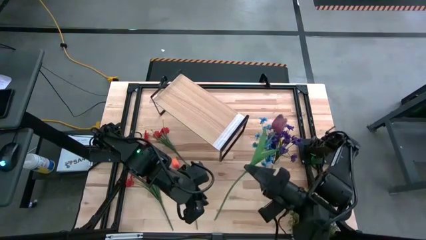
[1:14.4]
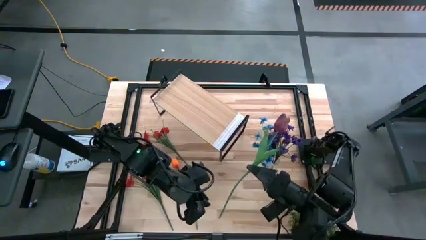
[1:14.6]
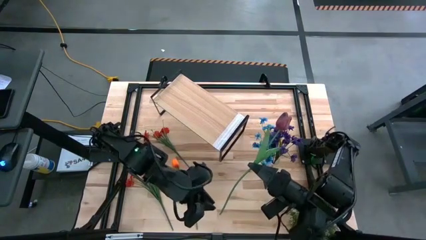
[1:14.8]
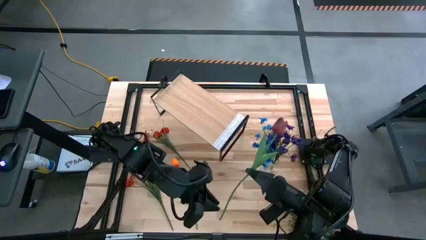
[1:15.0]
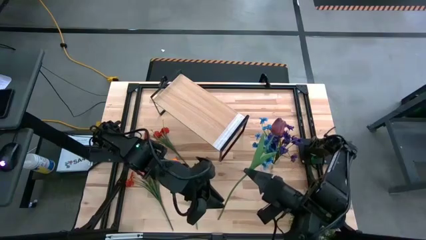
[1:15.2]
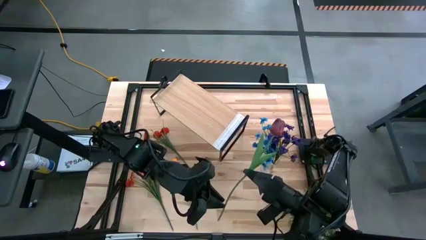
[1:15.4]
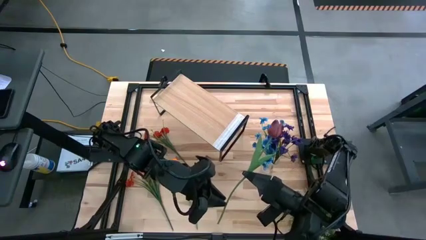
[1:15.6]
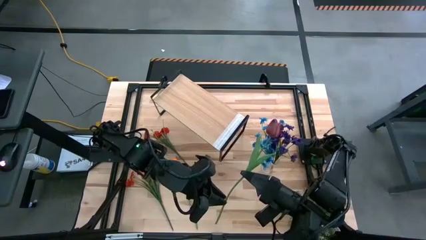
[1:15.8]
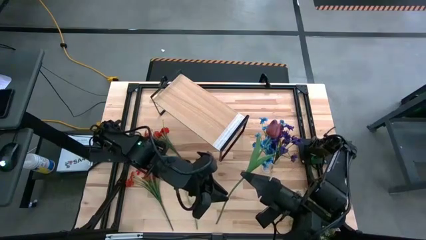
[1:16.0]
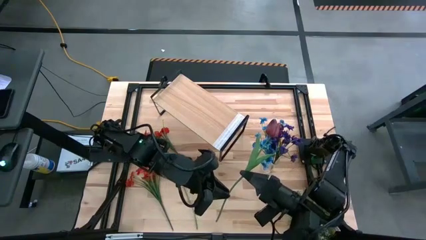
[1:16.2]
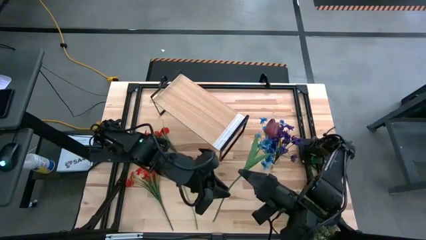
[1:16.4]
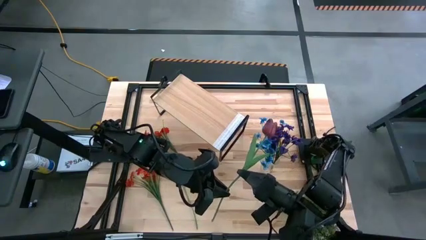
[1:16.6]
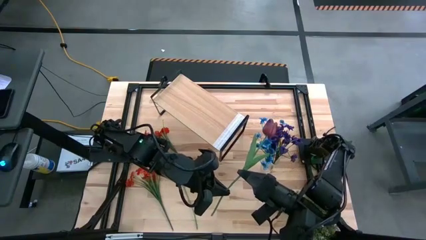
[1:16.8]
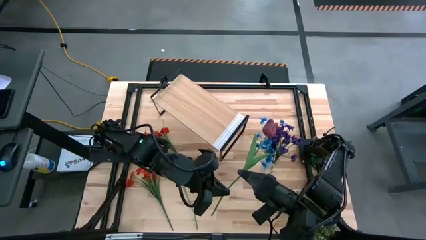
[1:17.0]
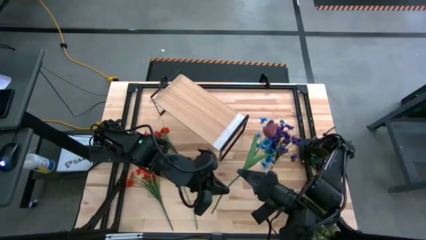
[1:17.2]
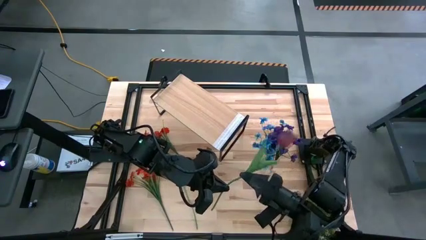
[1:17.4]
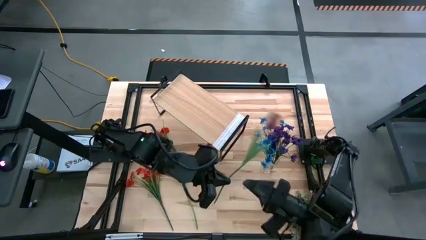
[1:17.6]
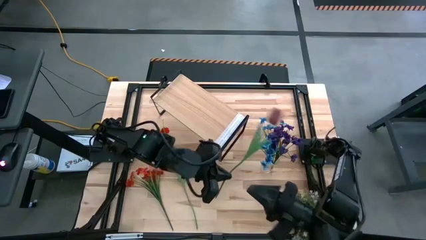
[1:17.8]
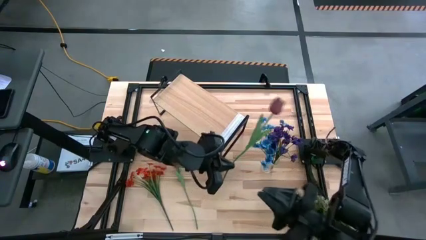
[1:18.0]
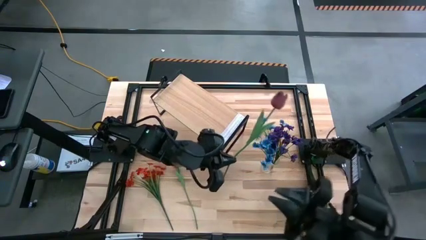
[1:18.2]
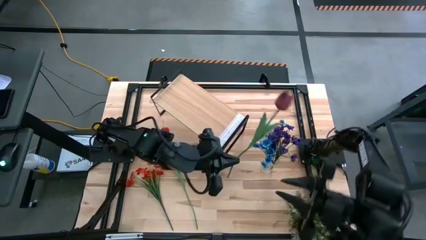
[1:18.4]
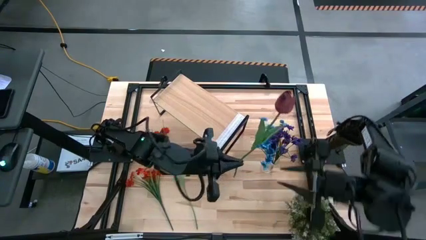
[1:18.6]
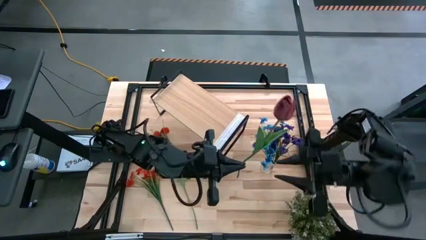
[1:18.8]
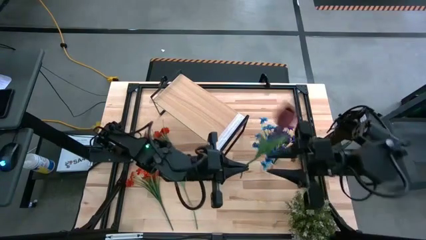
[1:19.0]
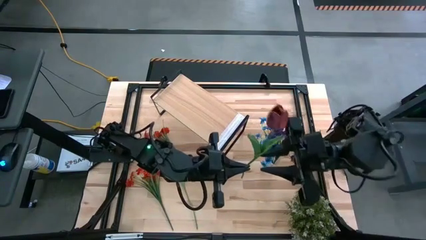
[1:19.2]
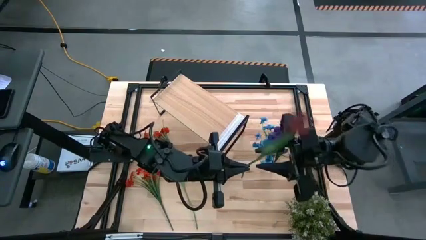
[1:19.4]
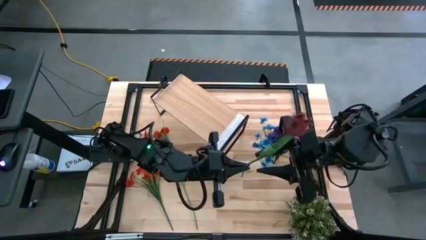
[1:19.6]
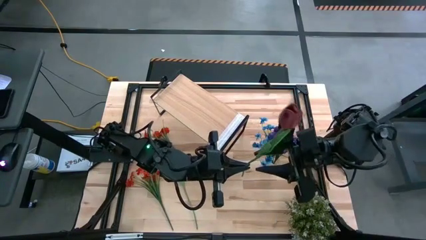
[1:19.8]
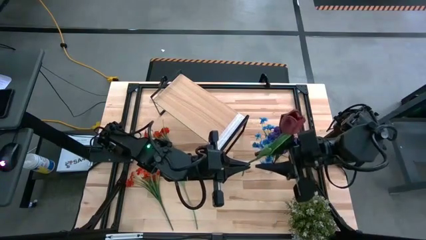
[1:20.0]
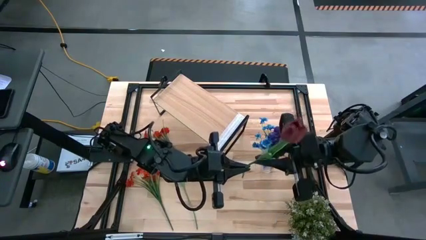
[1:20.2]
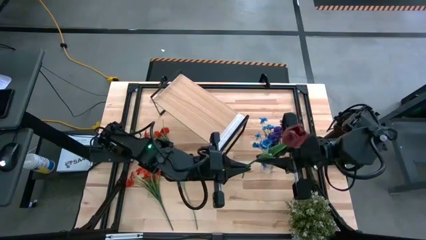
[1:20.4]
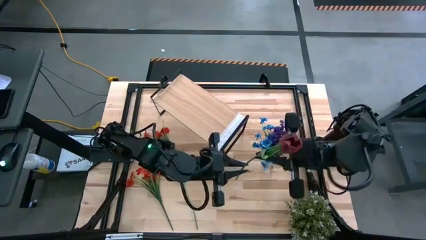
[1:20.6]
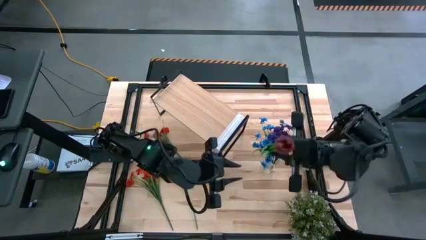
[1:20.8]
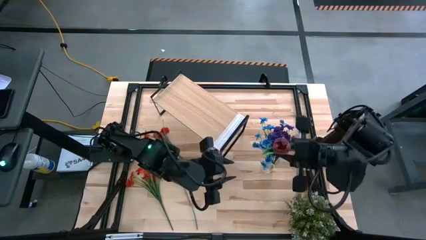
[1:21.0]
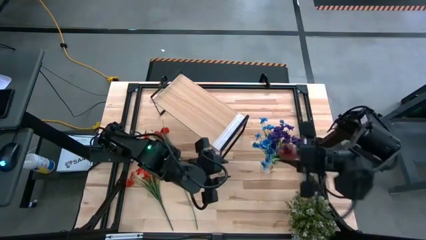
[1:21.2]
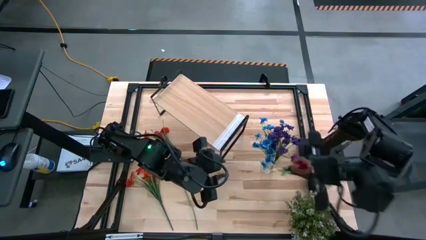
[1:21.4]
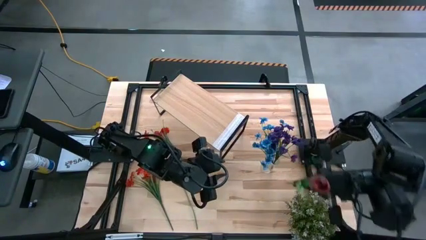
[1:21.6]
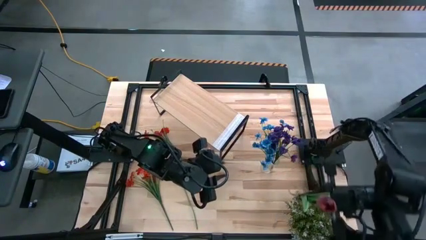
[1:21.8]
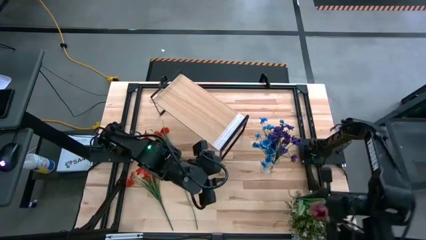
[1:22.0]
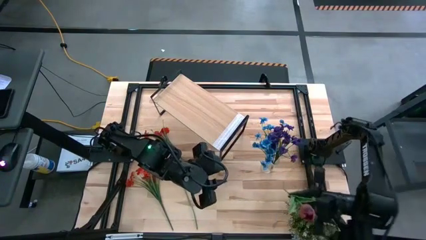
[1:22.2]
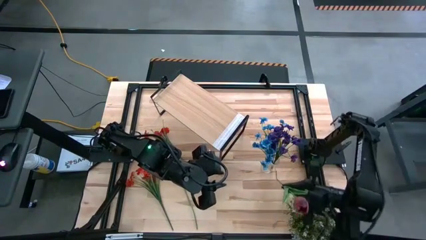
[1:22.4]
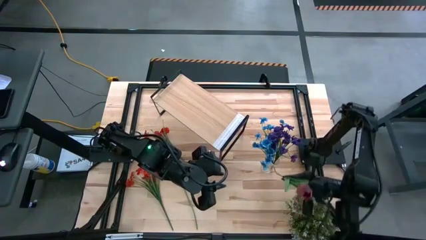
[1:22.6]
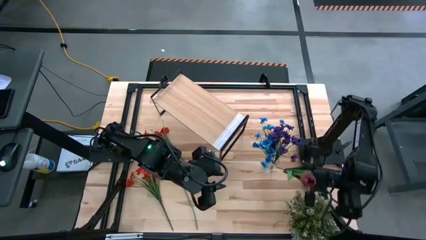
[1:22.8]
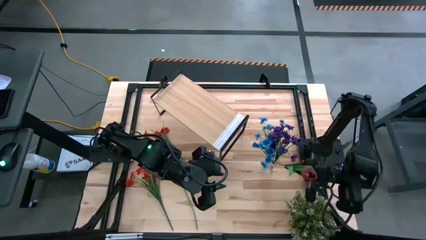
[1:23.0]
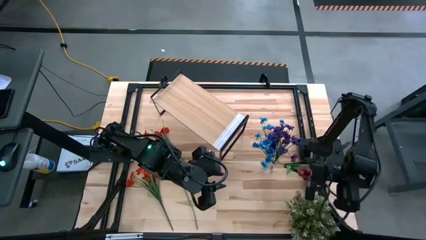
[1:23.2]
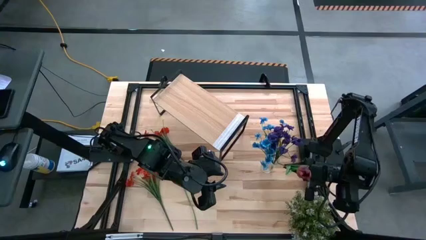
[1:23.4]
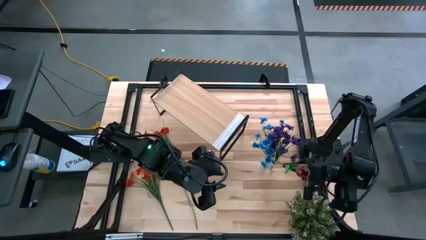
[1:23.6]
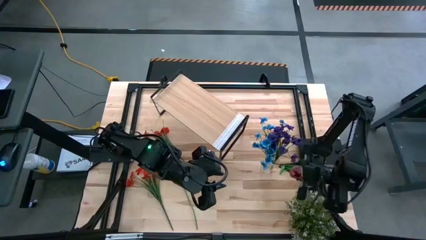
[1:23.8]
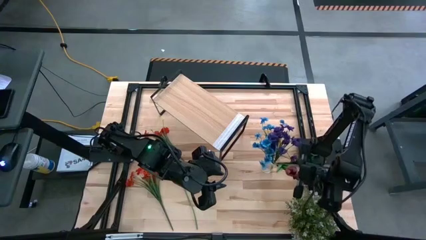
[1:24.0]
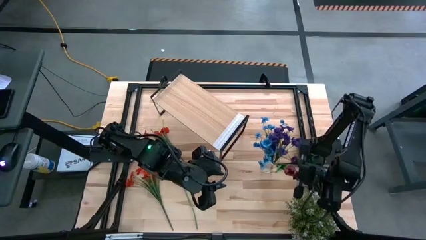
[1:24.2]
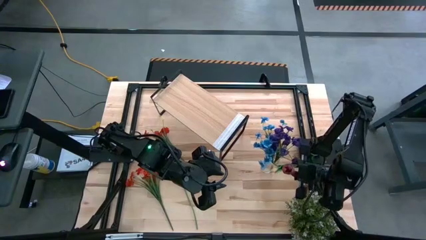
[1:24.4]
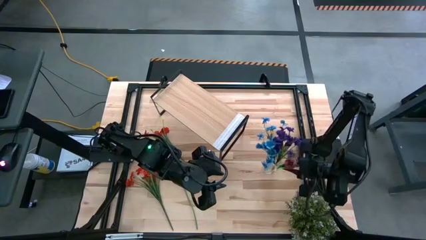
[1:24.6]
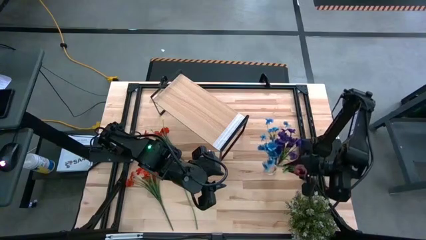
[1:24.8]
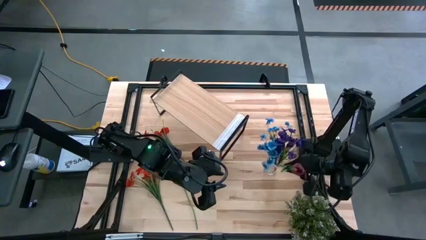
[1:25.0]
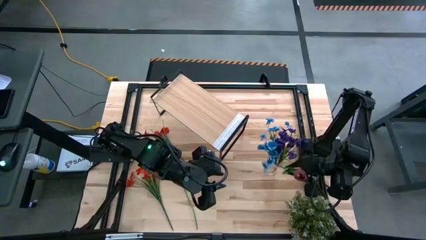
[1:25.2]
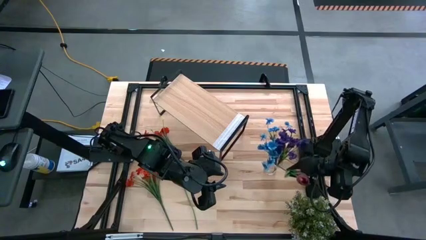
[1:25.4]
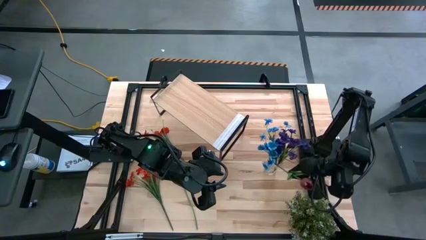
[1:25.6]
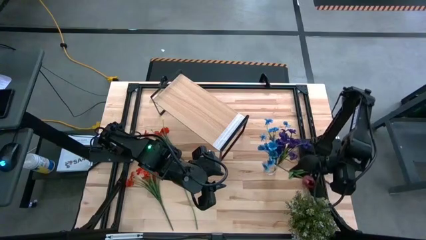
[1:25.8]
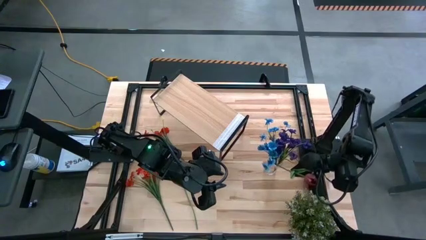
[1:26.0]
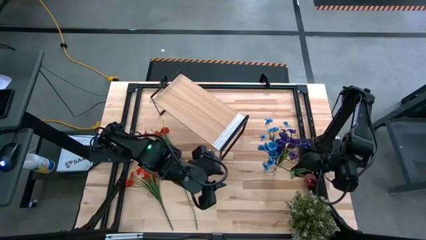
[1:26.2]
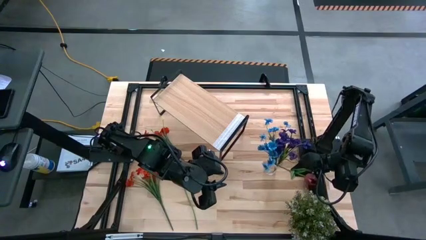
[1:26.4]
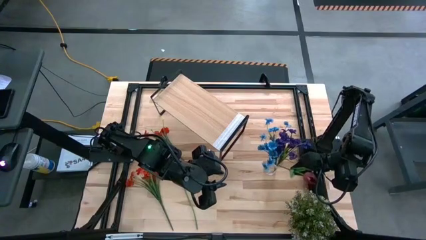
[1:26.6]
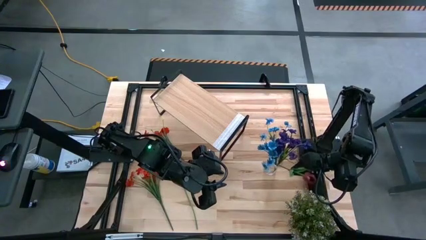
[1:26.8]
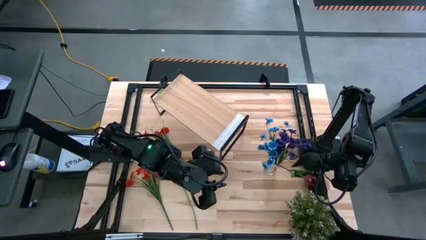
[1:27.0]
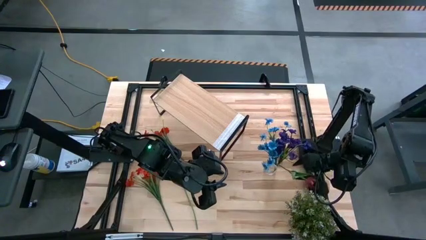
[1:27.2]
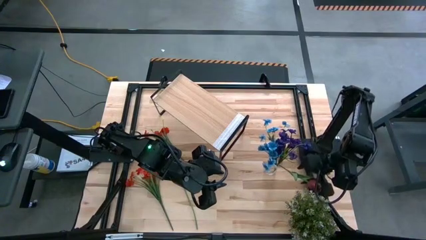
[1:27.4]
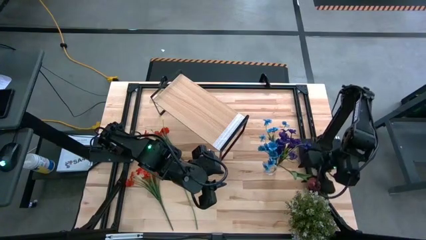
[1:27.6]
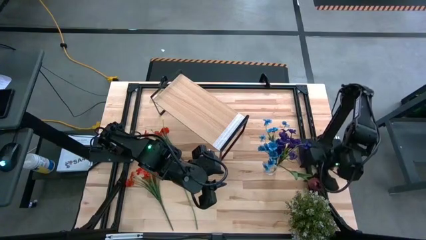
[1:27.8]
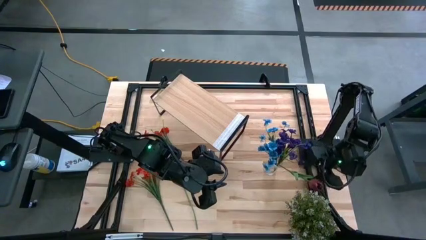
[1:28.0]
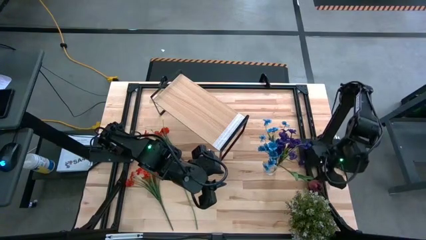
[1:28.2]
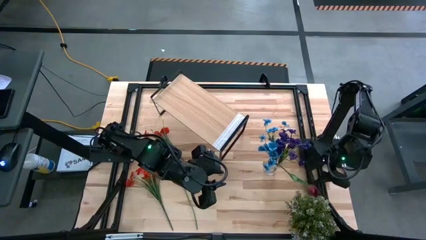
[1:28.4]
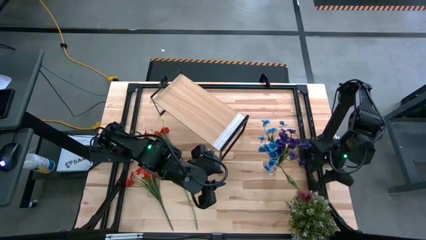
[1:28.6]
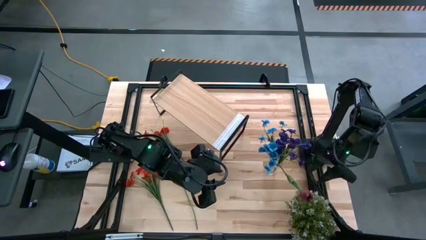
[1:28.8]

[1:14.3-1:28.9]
Task: Pick and place flowers into a vace then onto a shelf
Put the dark red tulip into the right transparent vase

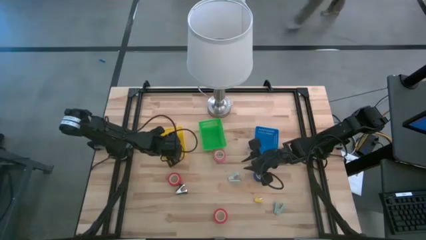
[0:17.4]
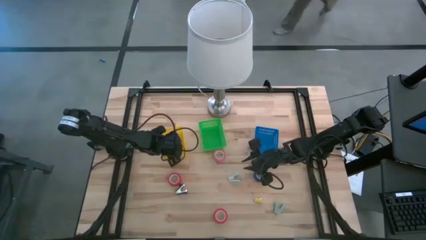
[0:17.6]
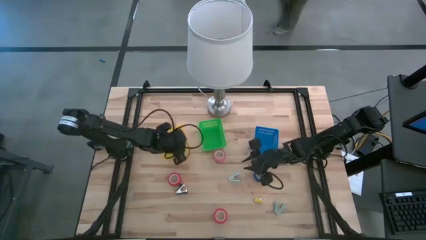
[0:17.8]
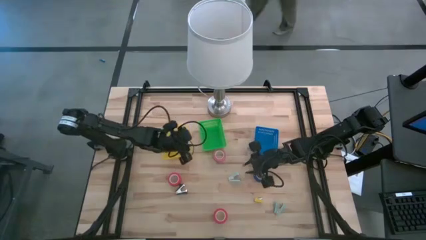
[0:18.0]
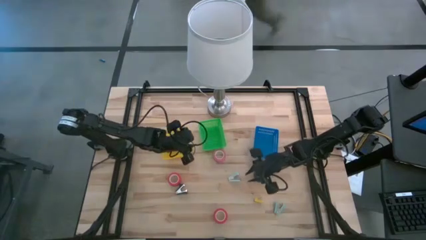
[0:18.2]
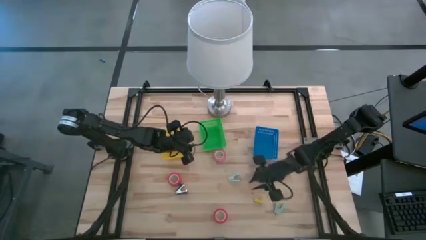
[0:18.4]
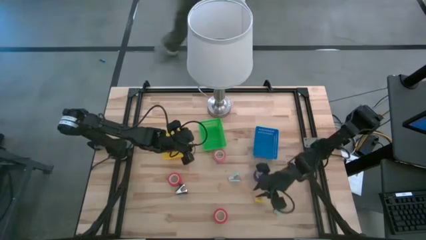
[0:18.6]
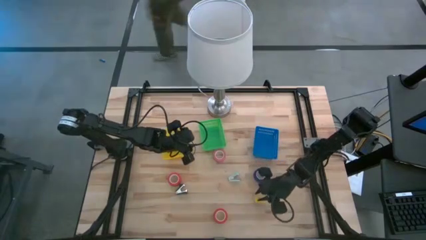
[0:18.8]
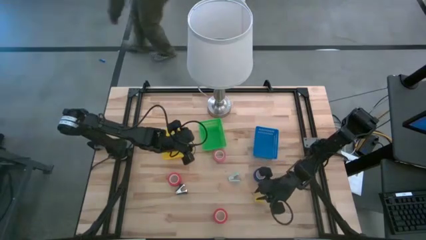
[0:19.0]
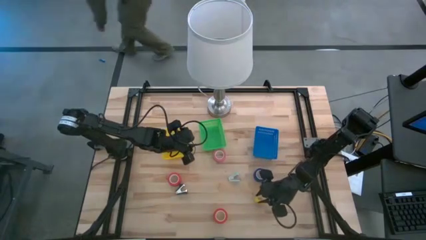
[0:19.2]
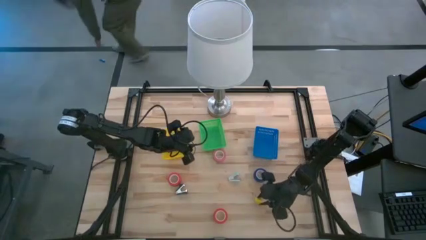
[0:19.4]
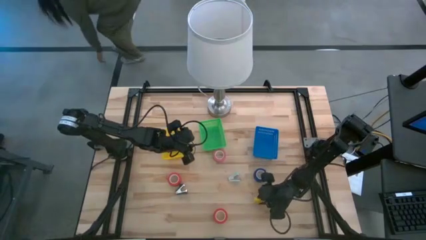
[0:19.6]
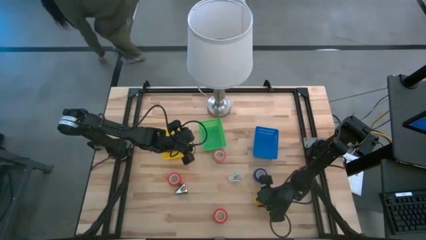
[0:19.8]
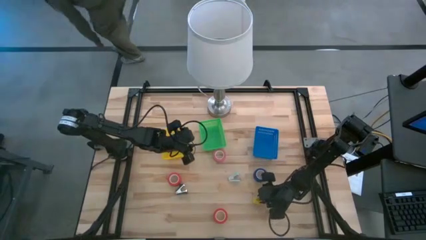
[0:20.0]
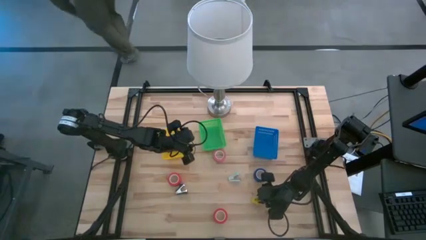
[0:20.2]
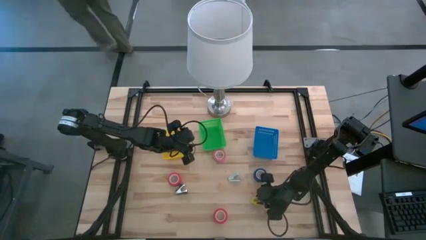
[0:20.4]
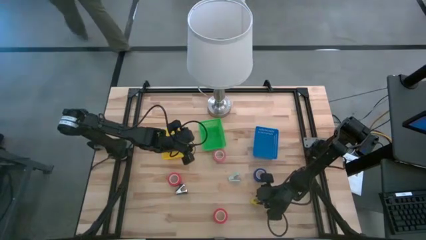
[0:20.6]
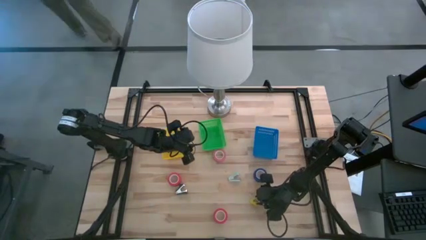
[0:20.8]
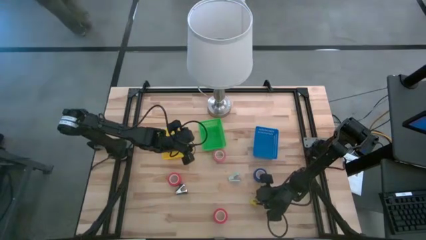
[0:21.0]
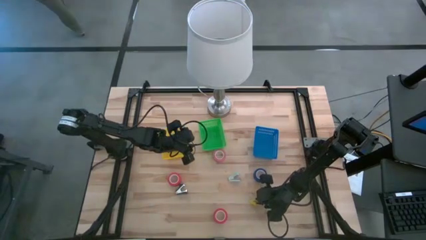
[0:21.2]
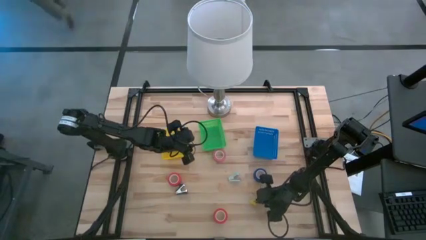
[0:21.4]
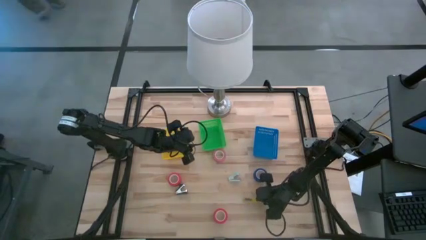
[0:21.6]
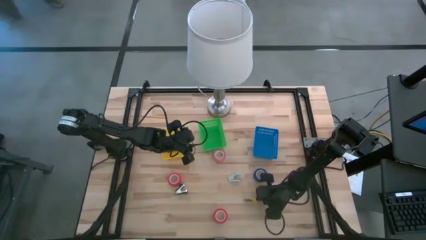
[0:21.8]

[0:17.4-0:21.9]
Task: Pick and place Stapler, Stapler remover, tape
Put the yellow stapler into the yellow bin
